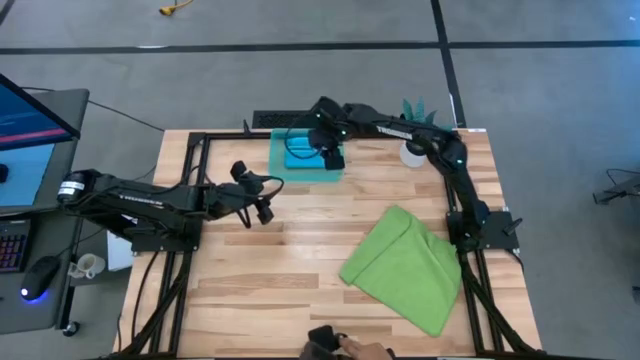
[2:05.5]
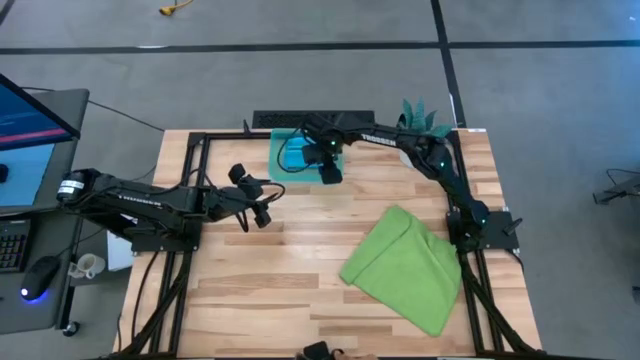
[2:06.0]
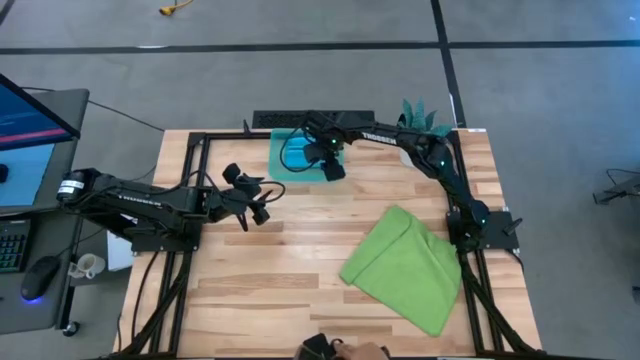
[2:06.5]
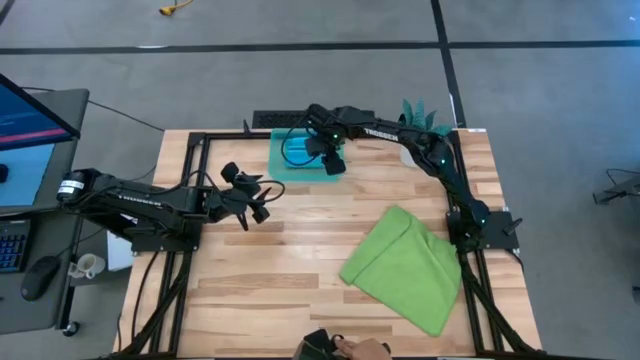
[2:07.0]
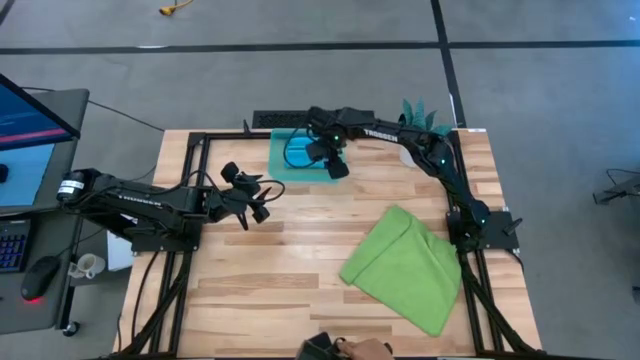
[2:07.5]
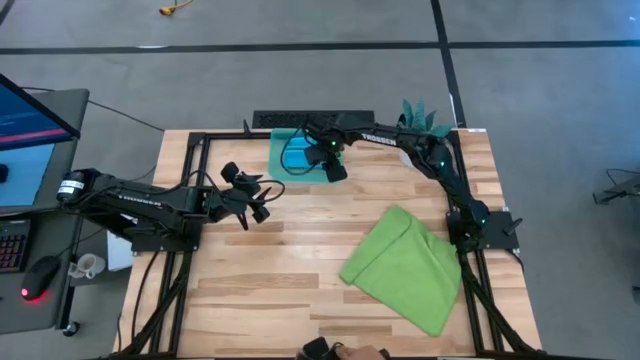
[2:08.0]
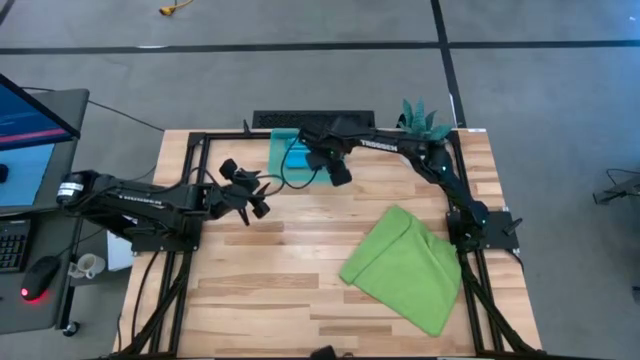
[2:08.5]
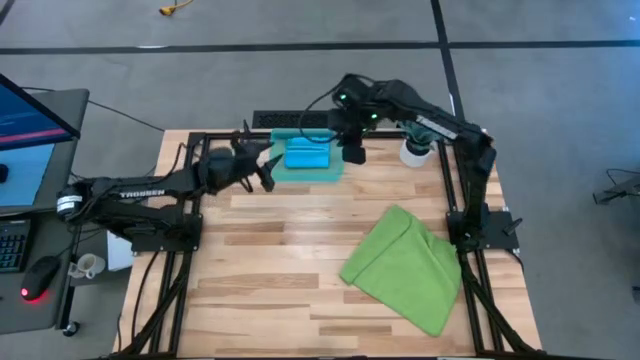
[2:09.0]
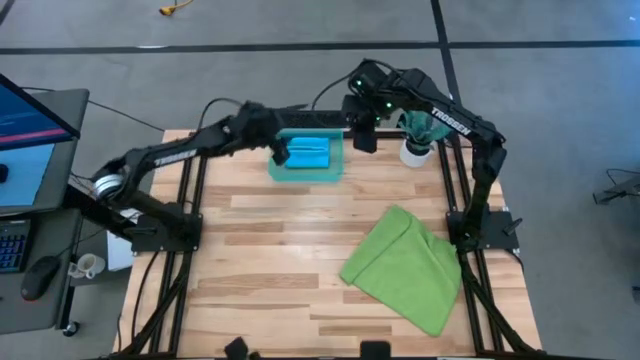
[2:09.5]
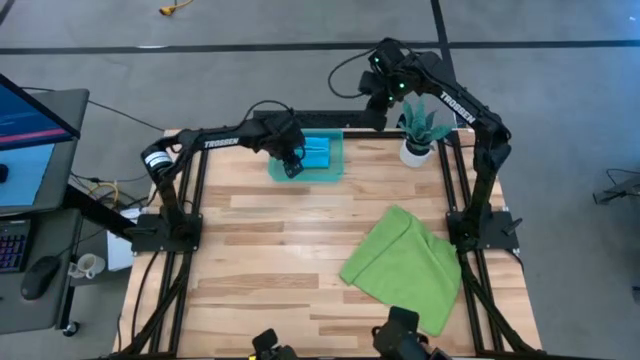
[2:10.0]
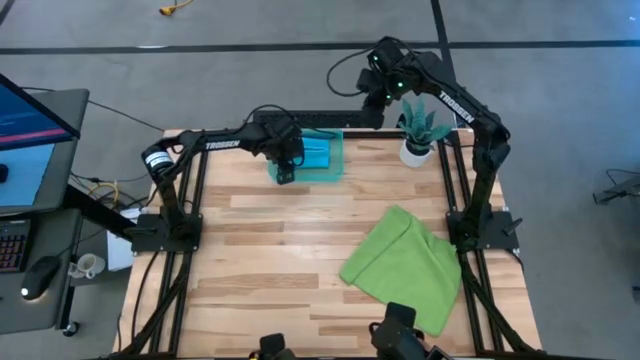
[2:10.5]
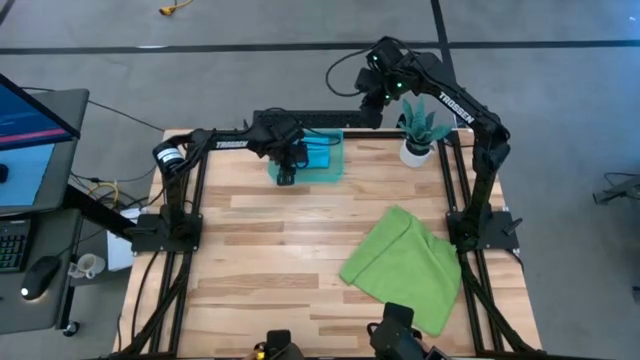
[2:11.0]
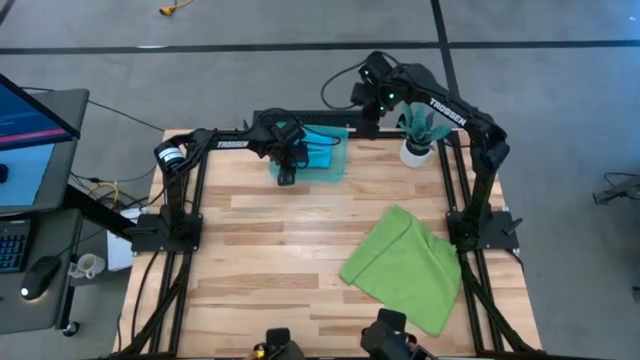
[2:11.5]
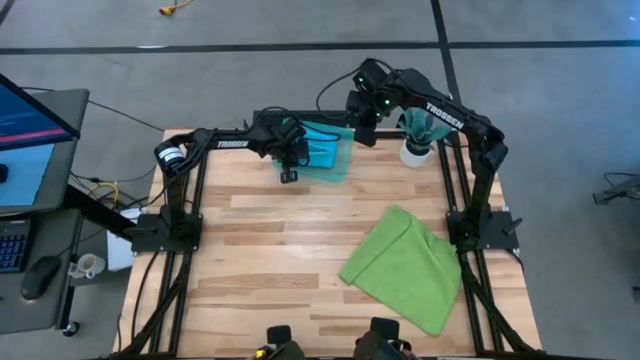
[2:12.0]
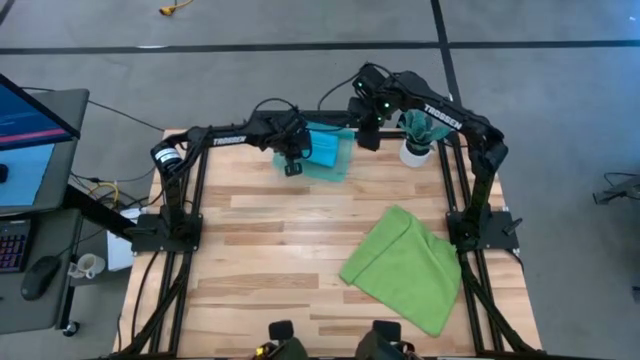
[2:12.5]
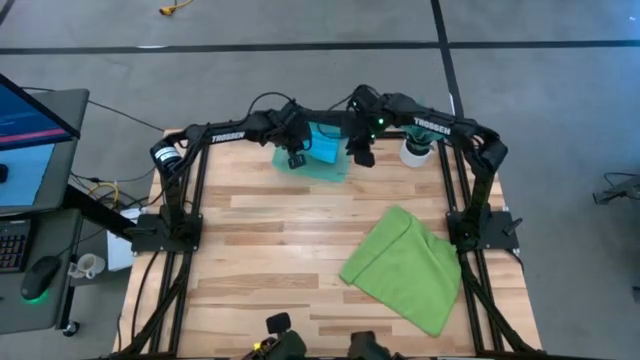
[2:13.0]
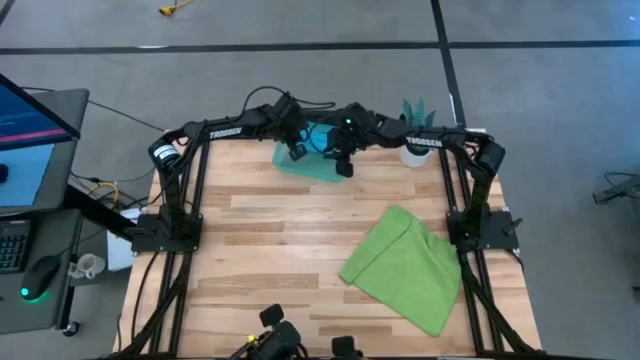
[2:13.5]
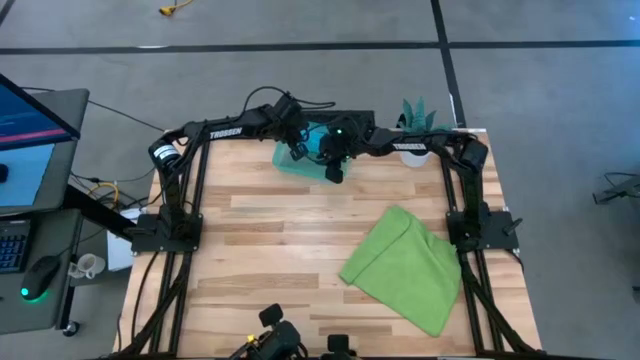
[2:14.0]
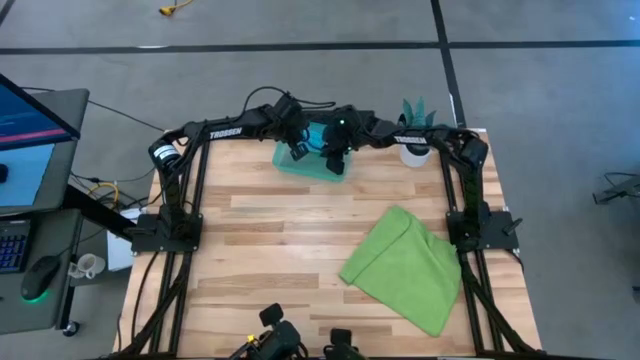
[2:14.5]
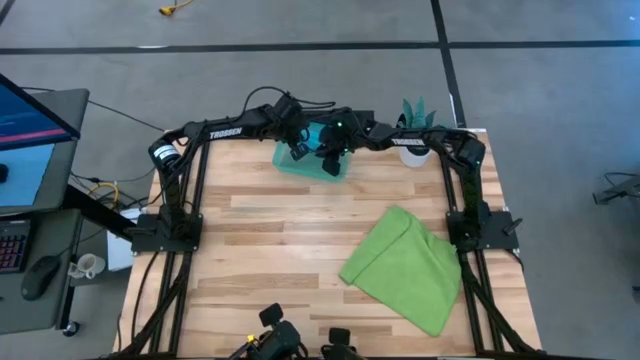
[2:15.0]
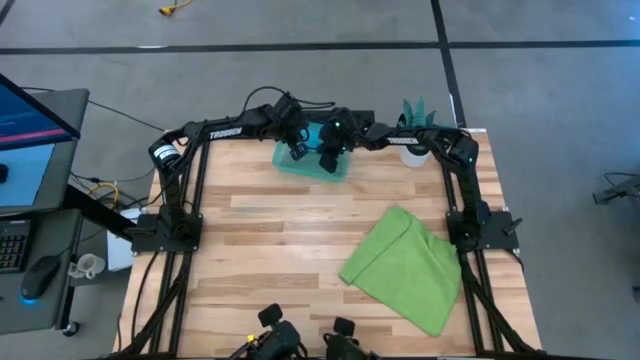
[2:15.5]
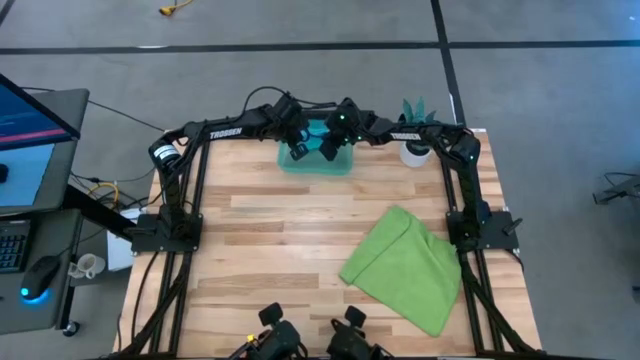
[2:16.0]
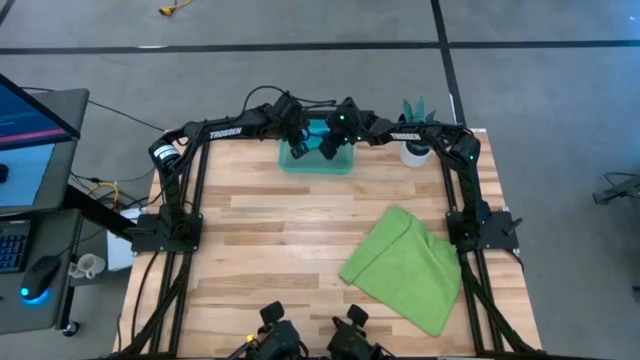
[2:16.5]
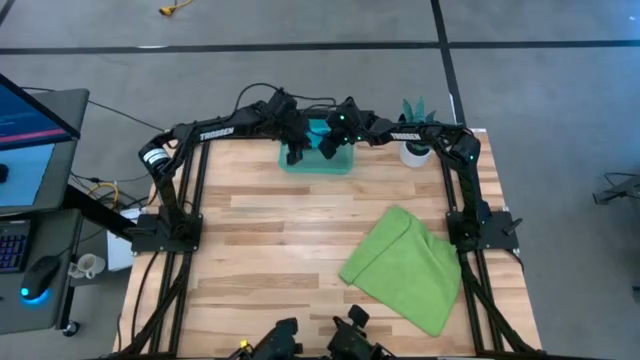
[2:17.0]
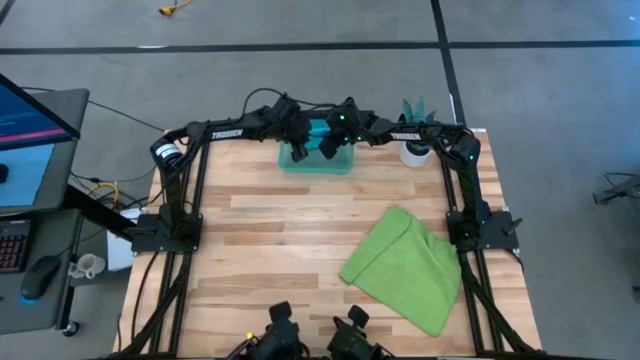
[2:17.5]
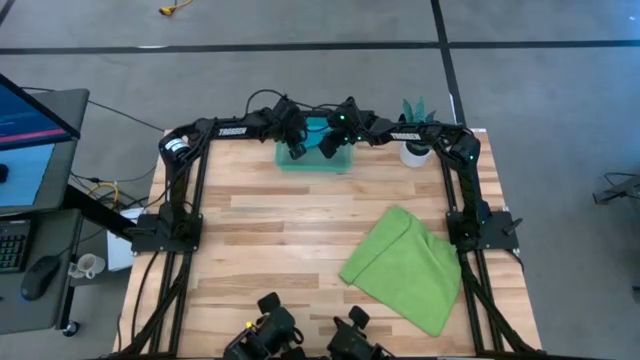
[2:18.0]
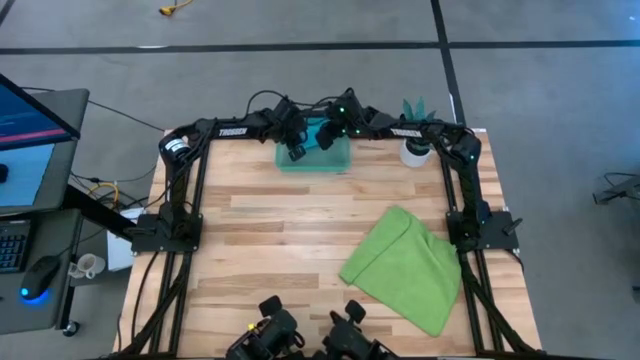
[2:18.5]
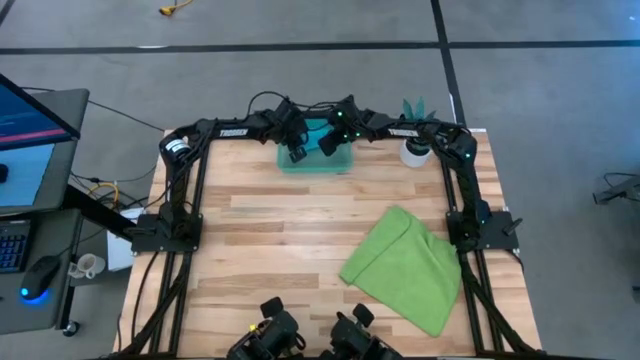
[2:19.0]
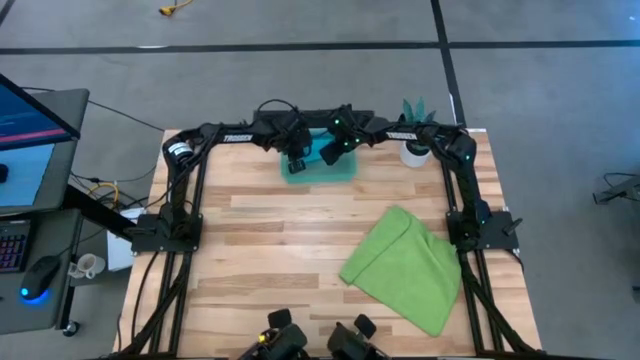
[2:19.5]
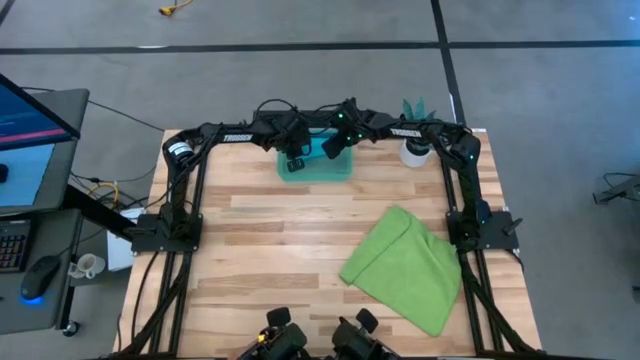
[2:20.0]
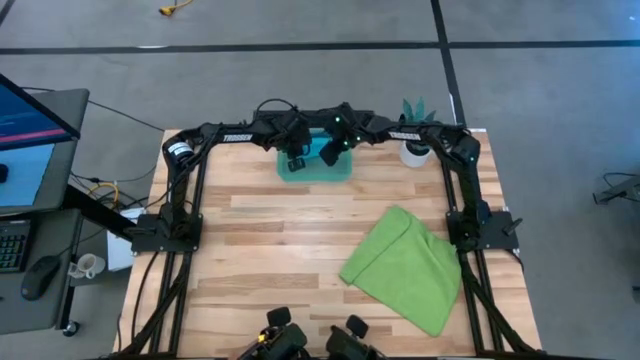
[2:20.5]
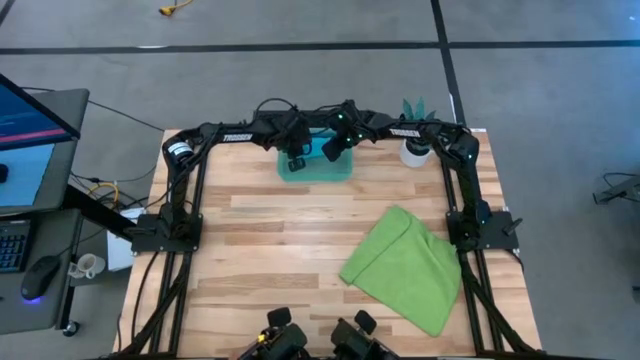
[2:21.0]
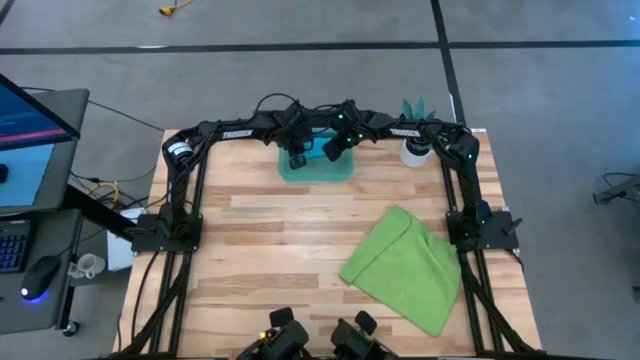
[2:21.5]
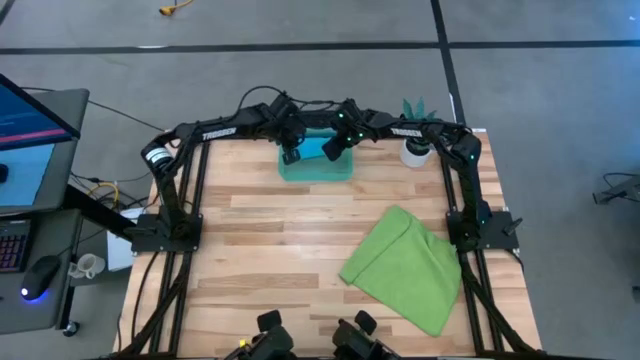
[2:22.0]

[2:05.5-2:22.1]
Task: Roll microfiber towels into tight, uniform cylinder then place into a basket
Put the microfiber cloth into the blue bin

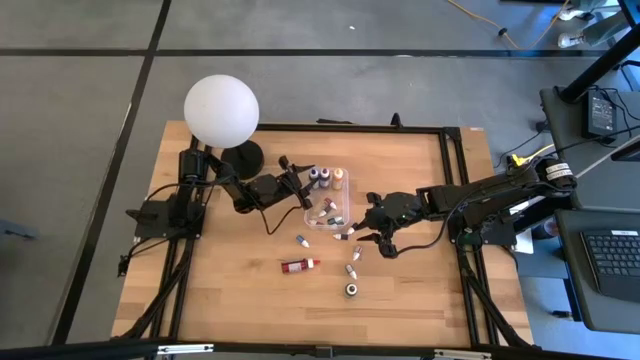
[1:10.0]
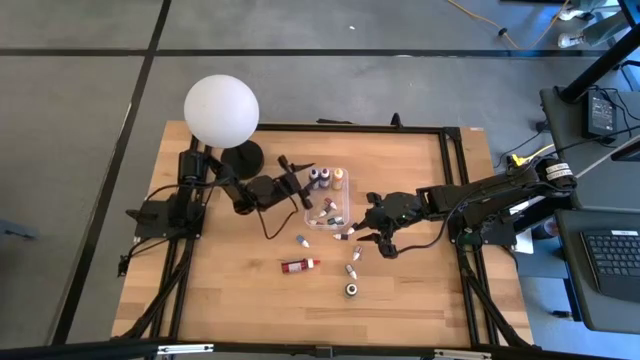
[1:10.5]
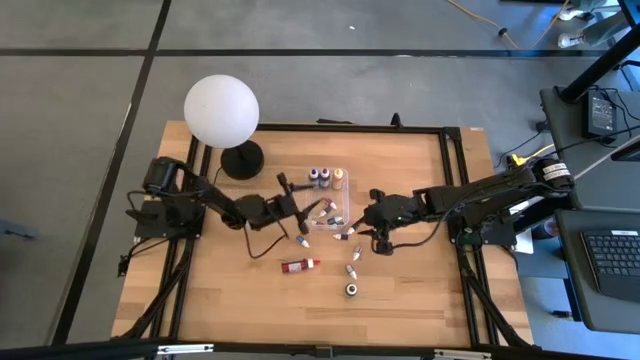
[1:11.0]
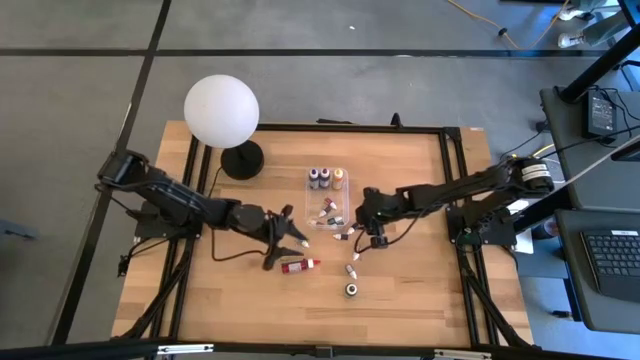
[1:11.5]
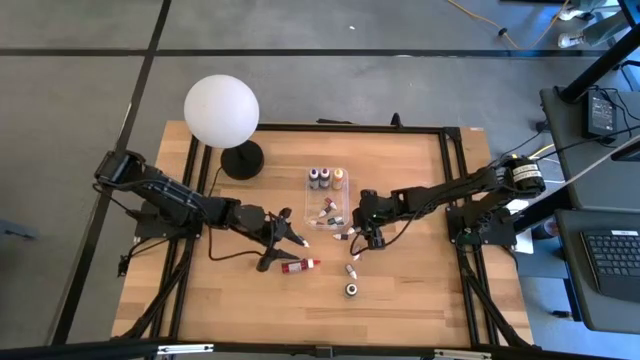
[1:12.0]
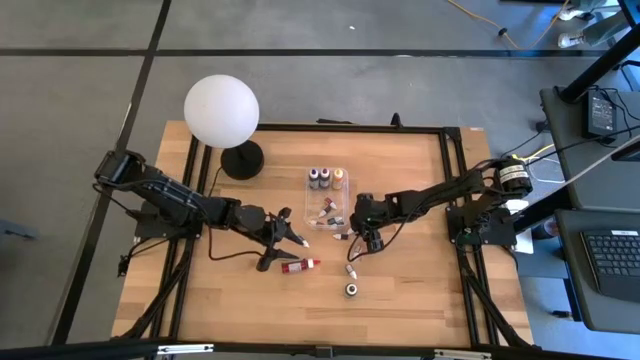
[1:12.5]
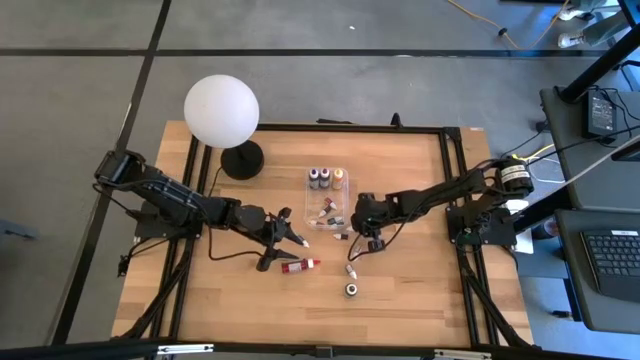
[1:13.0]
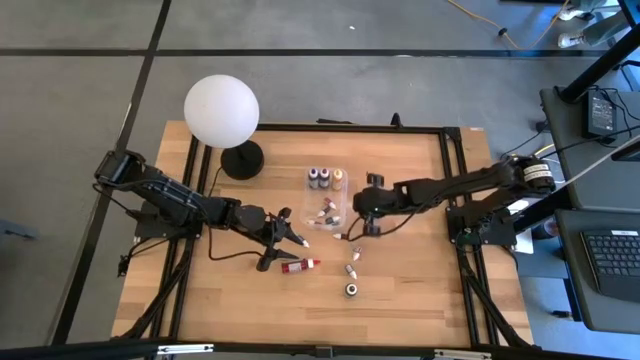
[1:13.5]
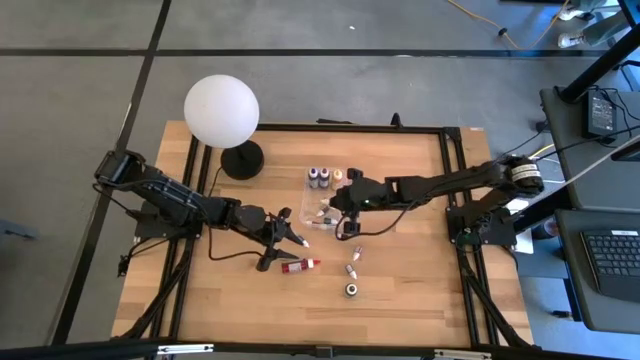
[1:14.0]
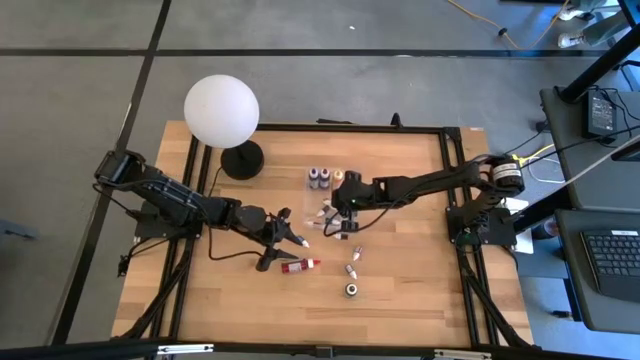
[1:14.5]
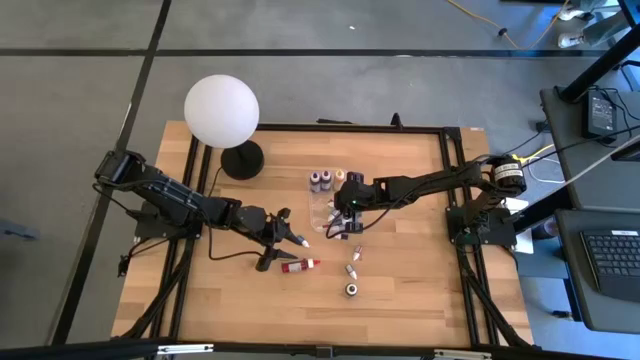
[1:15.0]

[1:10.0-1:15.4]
Task: Pick & Place food coloring
Put the small black food coloring bottle in the transparent bin
